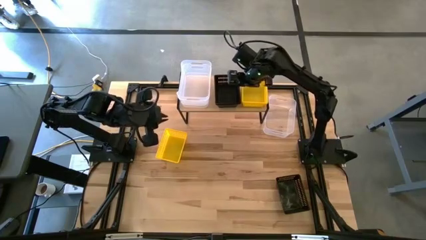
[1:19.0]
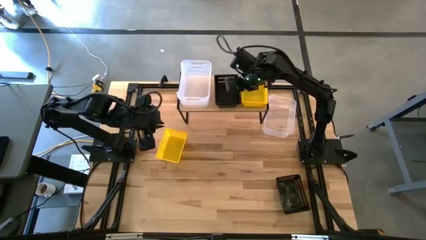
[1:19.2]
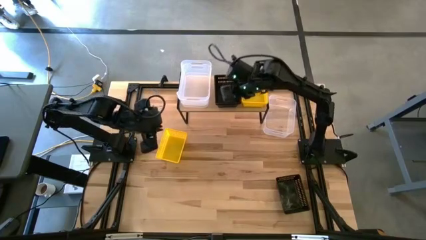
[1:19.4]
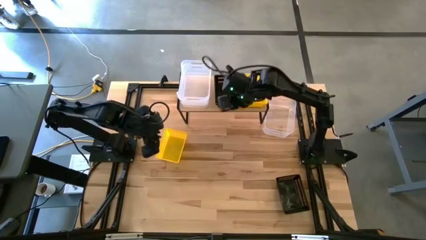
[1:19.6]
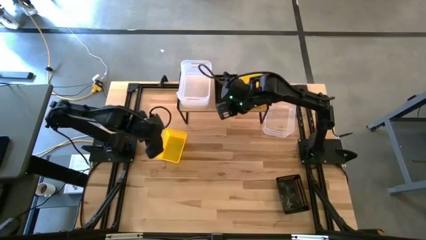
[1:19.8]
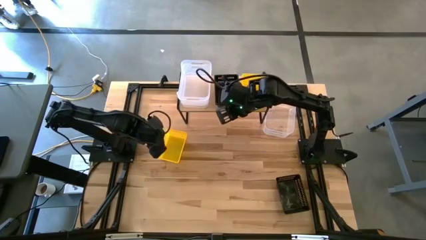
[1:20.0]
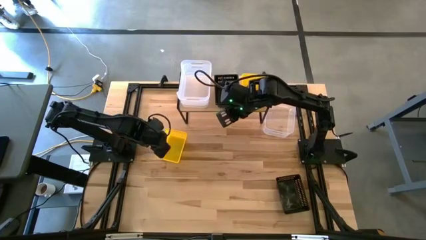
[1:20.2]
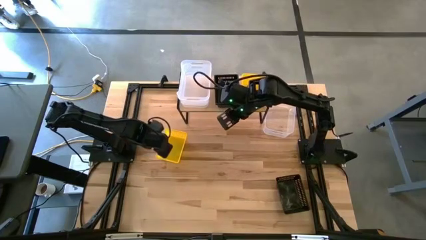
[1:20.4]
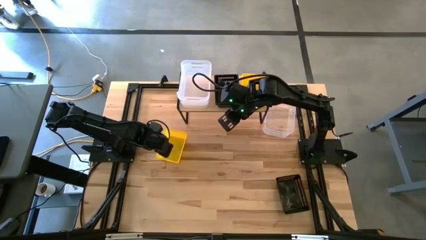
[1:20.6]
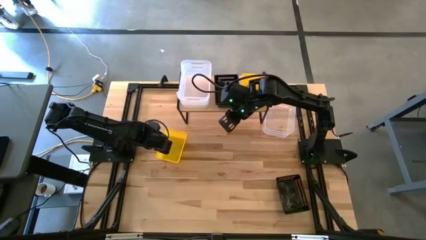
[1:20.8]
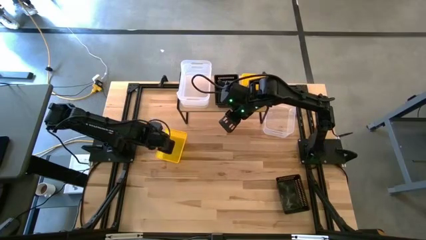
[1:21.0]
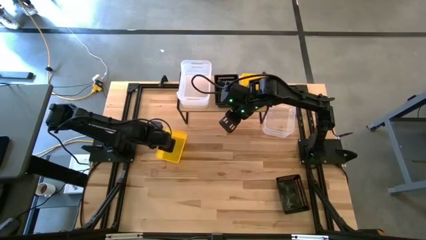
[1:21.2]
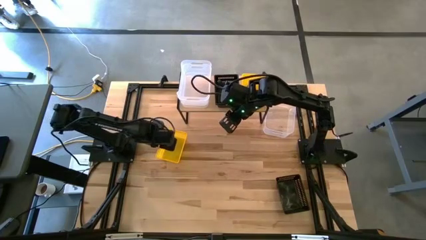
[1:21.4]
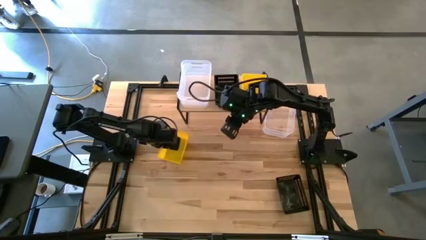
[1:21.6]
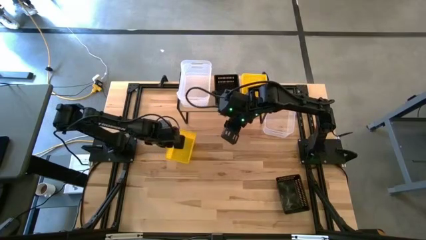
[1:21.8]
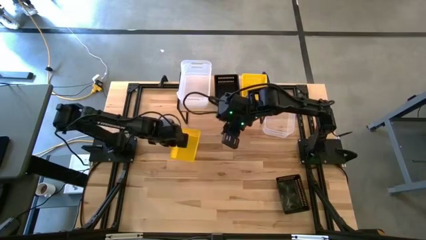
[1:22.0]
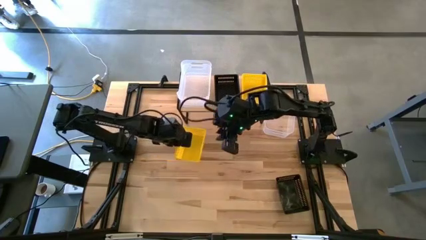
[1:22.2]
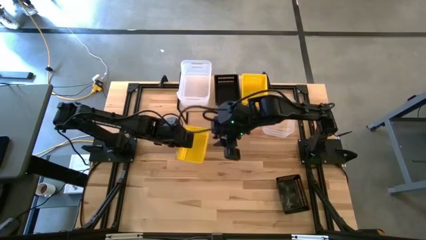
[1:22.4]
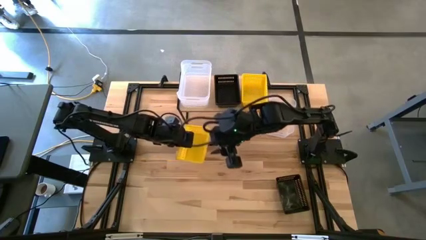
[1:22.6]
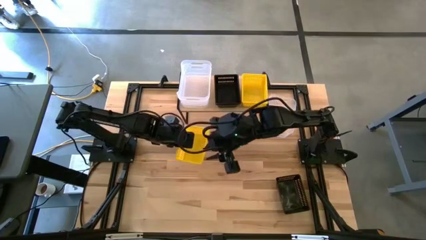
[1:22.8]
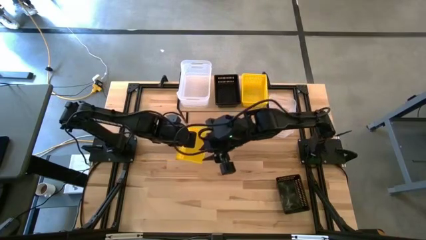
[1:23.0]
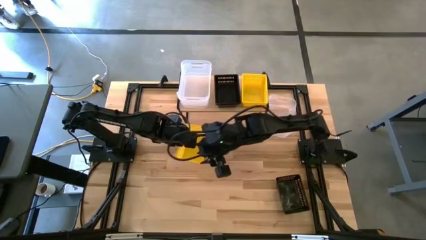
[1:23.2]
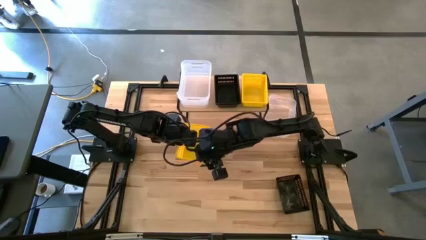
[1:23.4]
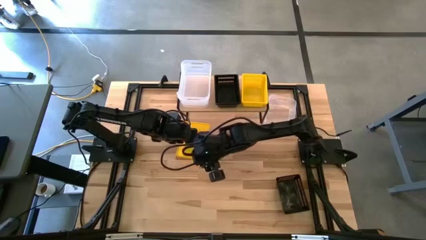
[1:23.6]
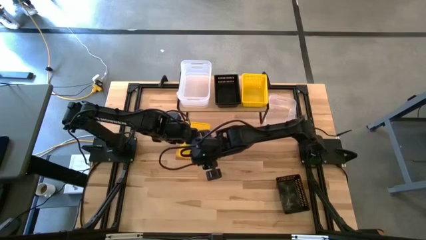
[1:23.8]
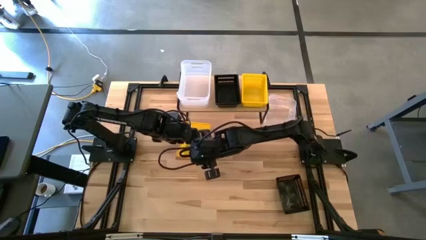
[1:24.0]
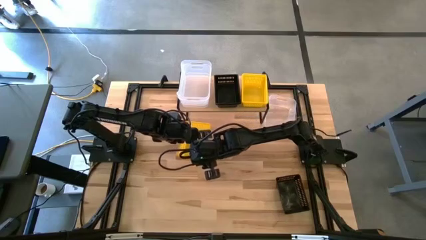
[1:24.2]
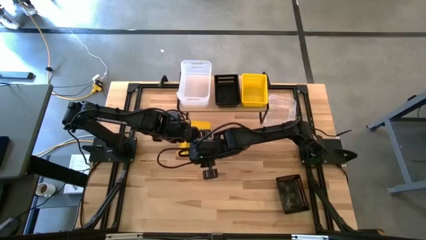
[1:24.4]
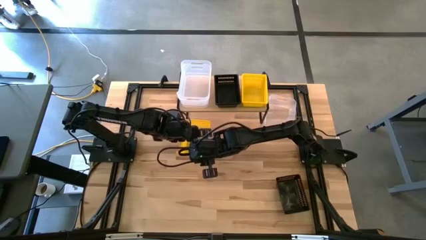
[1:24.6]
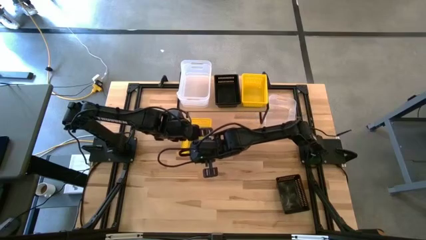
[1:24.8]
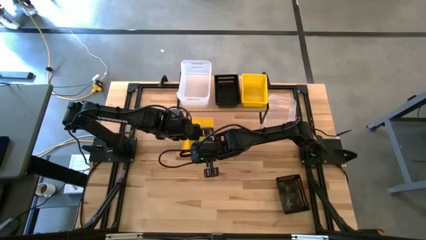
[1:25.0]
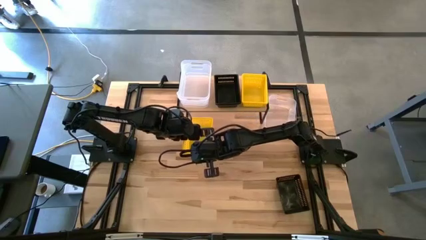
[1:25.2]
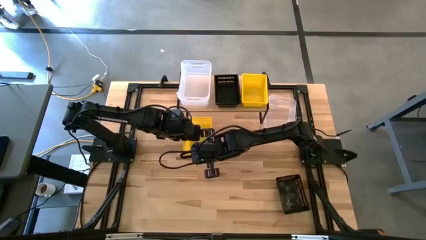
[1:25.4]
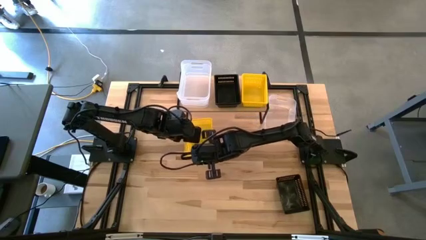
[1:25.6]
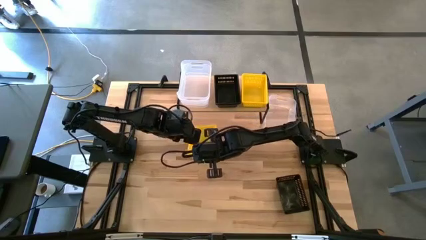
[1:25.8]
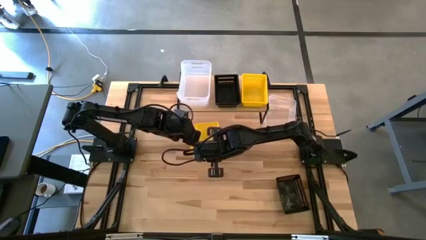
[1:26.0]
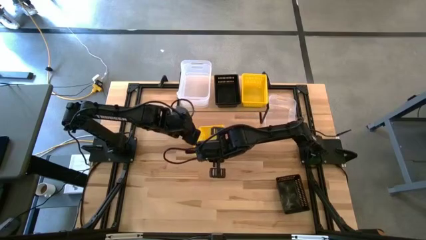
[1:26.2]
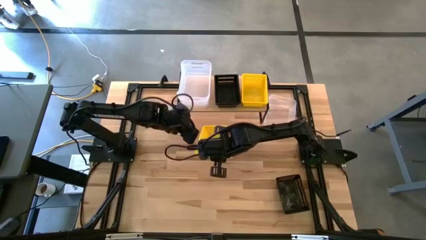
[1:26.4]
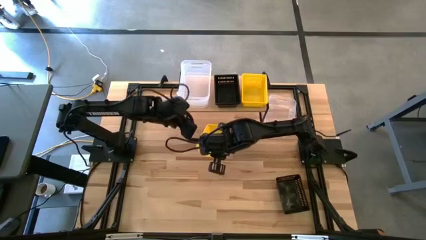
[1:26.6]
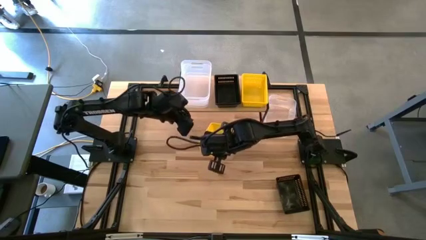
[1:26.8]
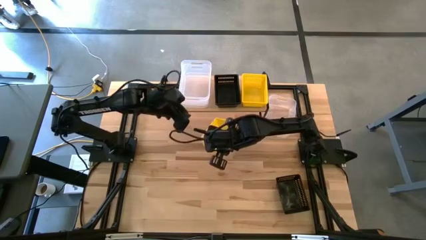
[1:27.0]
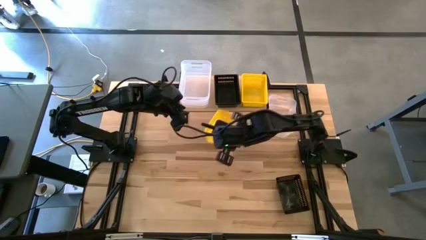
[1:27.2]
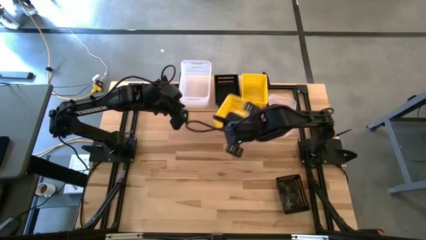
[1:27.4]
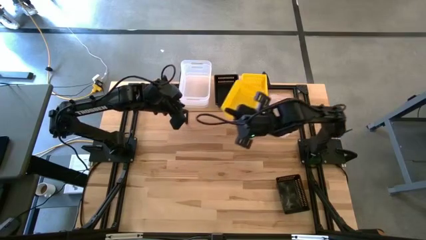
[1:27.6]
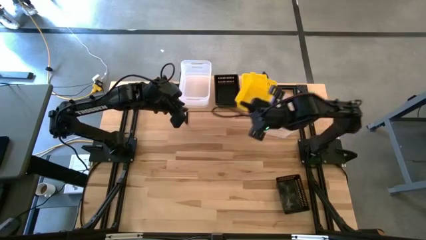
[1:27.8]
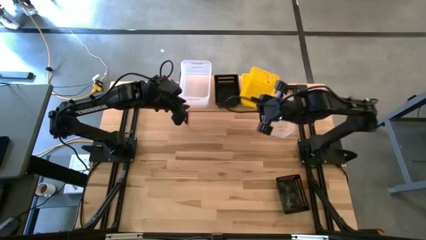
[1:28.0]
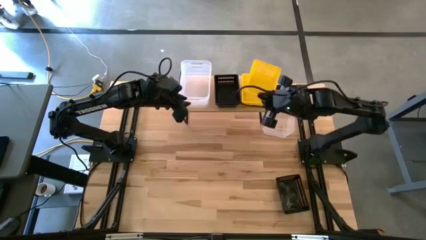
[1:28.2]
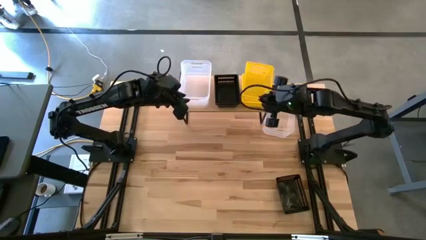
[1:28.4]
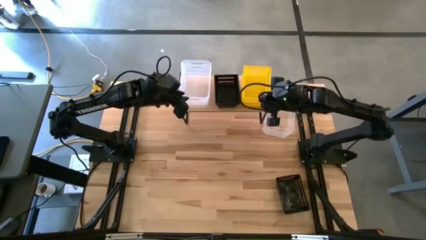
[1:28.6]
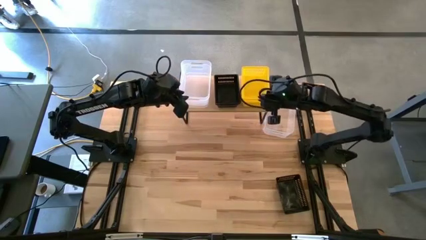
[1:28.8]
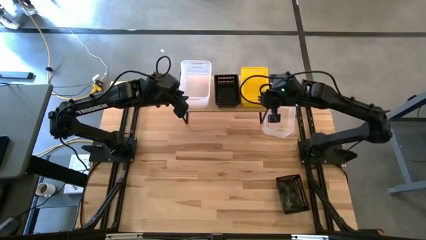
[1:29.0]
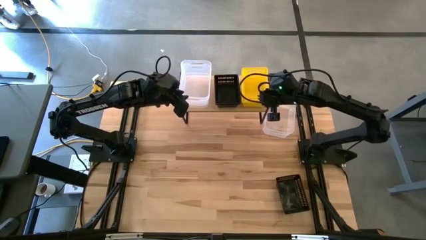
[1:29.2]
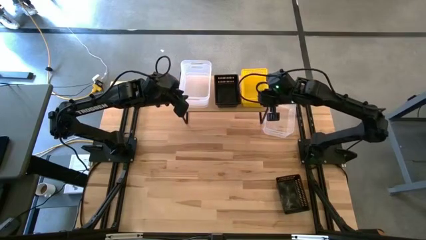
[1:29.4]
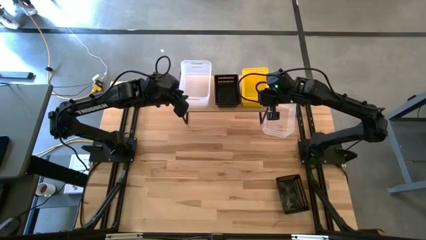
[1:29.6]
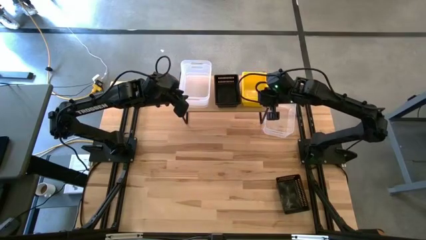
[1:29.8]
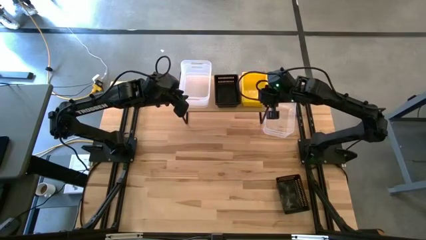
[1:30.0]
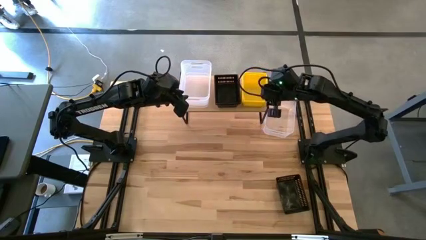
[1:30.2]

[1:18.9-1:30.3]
Task: Stack baskets on shelf by color
Stack the yellow bin on top of the yellow bin

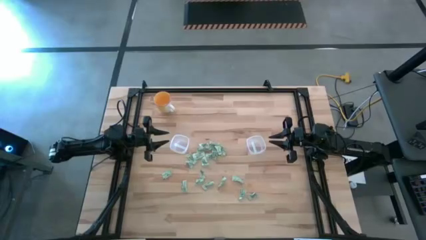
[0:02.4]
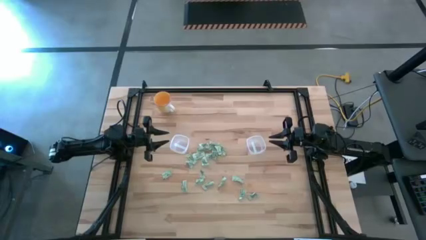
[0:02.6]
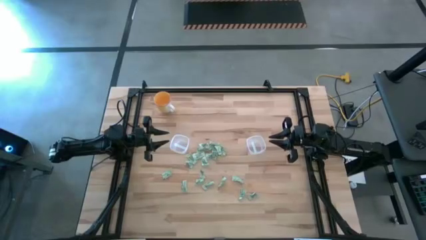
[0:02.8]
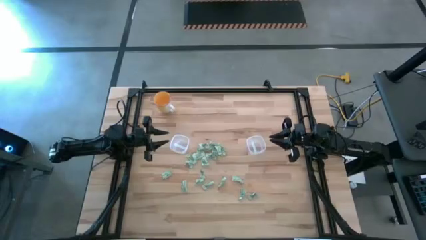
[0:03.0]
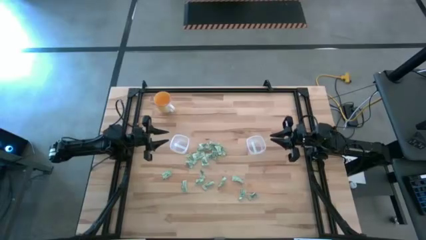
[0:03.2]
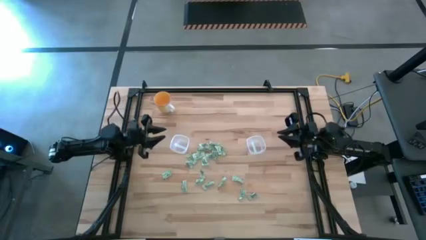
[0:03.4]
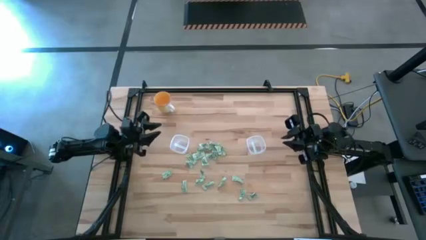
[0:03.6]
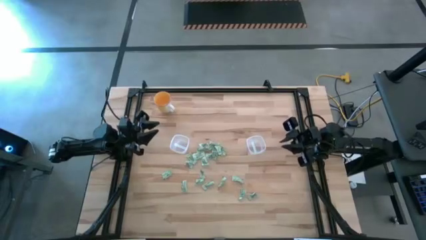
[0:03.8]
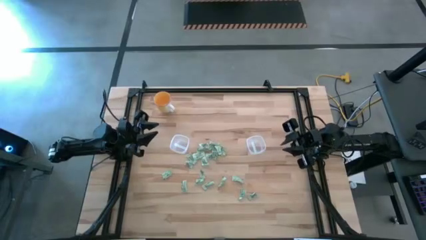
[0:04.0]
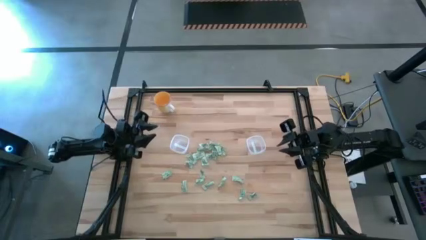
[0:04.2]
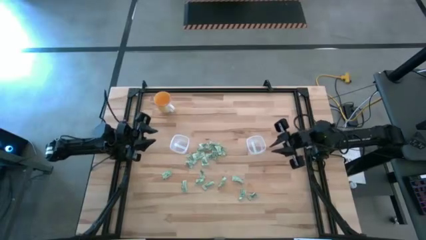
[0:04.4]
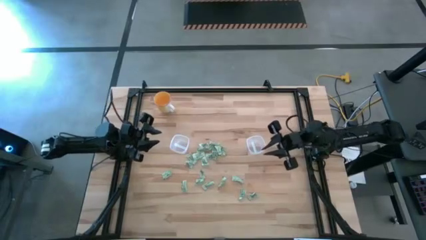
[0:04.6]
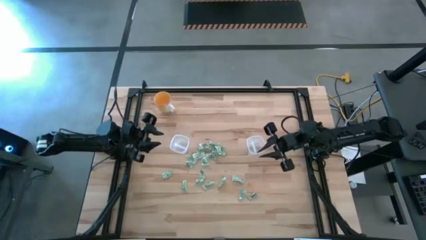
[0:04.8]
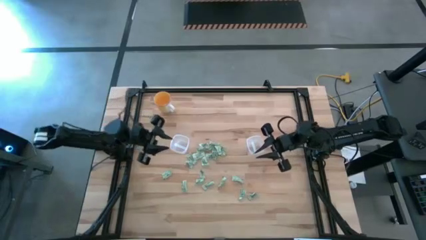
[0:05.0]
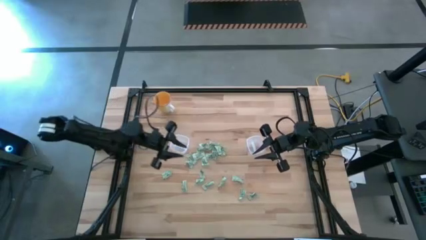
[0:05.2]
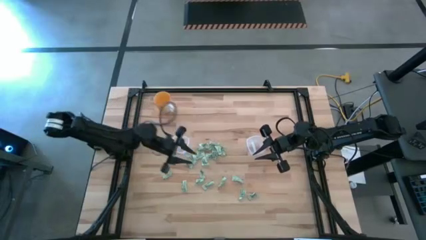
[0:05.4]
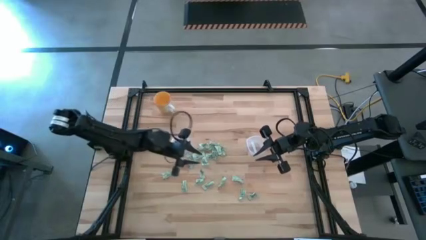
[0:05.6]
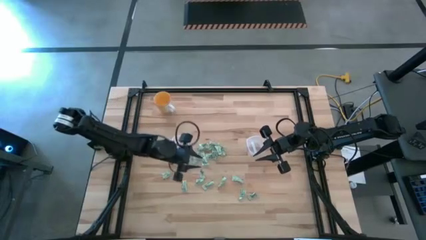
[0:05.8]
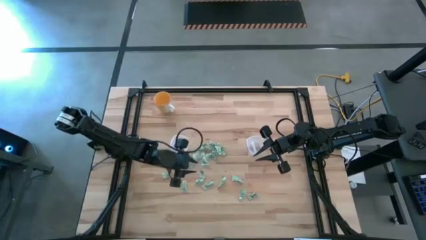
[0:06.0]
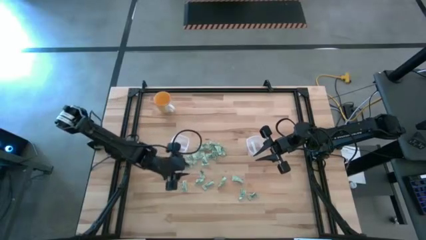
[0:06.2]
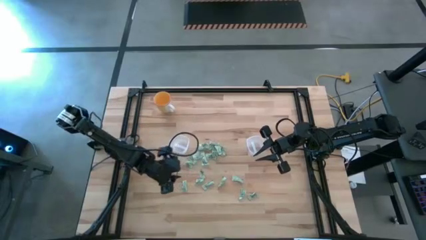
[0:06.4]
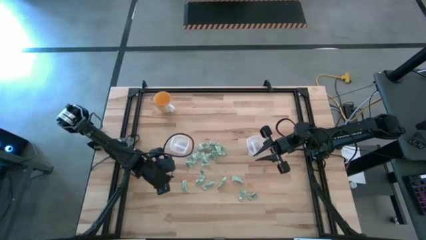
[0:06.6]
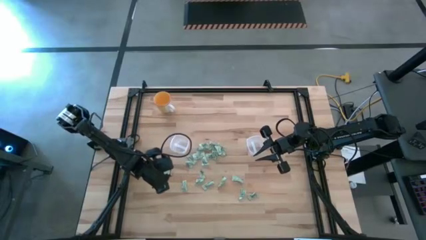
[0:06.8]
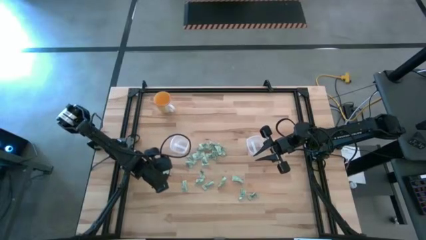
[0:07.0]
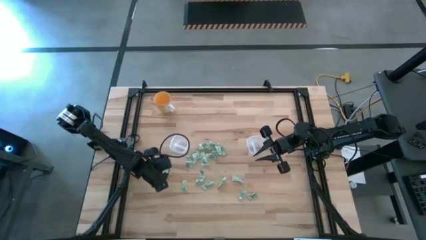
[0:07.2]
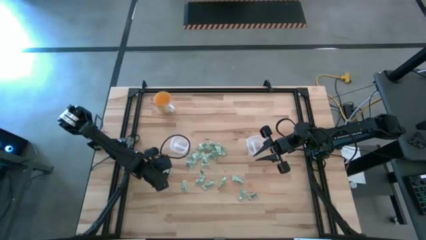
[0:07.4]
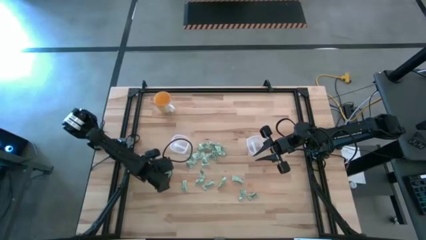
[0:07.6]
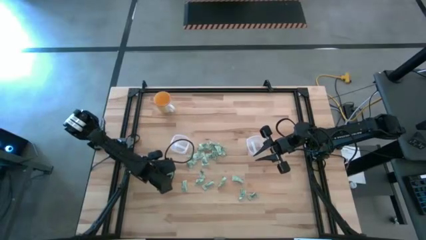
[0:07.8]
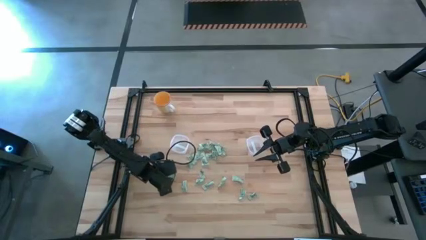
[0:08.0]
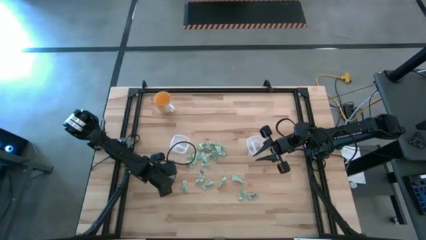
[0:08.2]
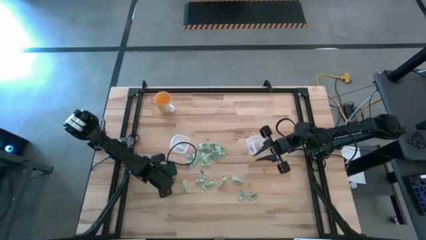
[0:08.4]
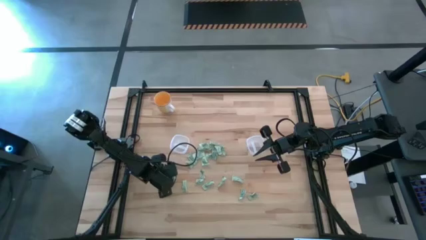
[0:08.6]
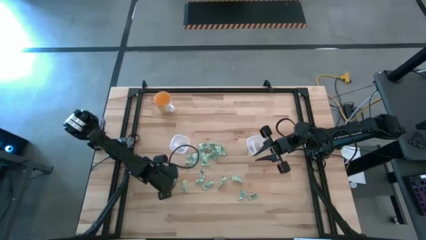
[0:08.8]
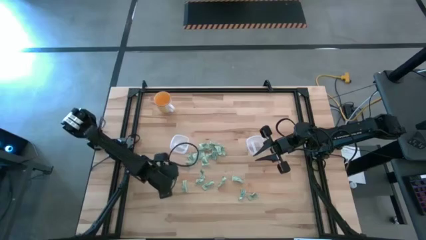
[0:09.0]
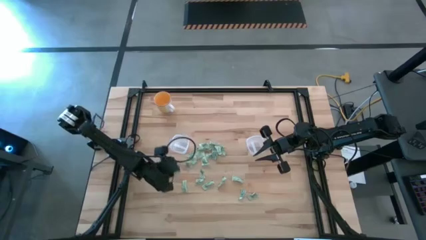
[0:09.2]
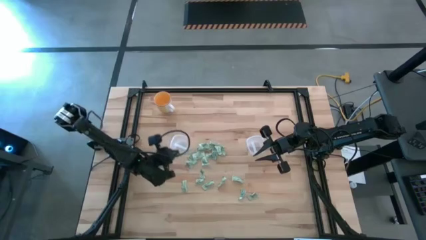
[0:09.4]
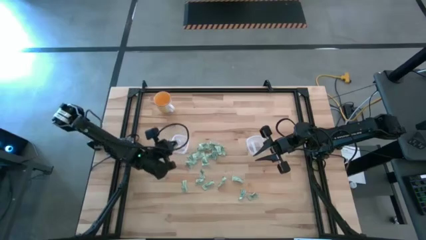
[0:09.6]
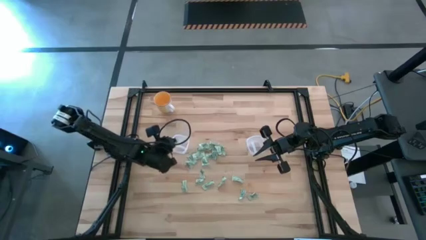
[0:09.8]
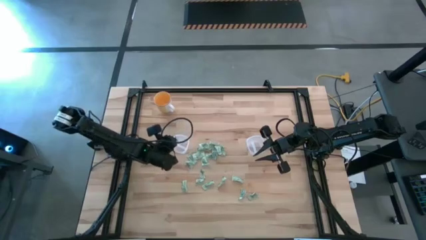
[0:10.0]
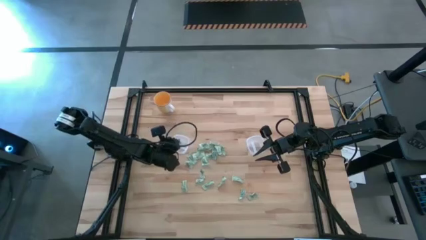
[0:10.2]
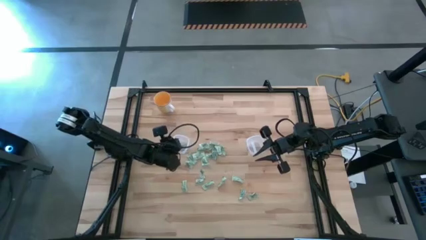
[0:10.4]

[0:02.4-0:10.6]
Task: Pick and place Stevia / Truvia into bins
Put the stevia packet into the left transparent container
